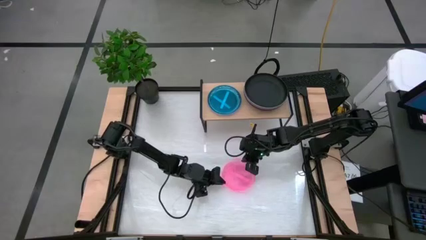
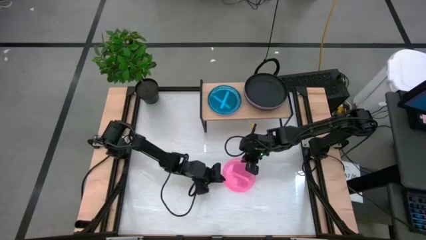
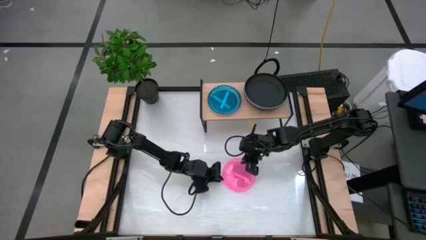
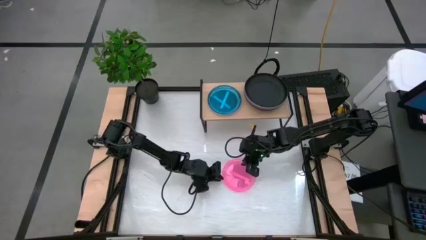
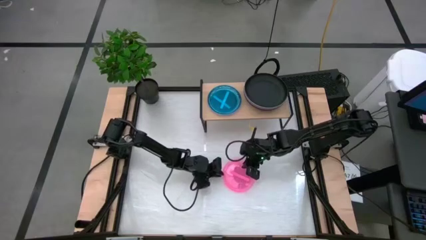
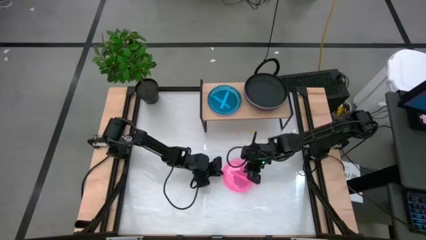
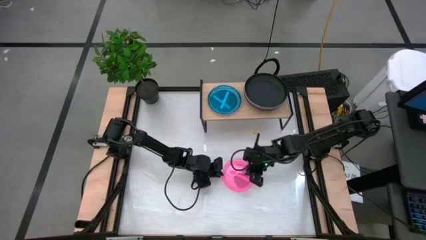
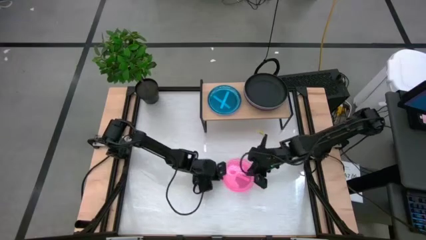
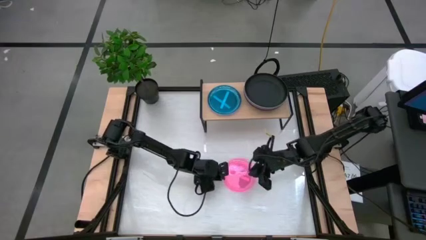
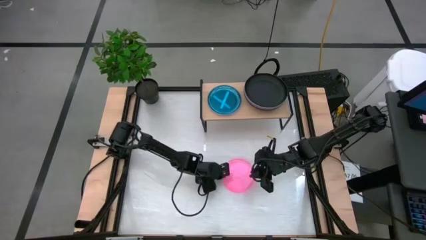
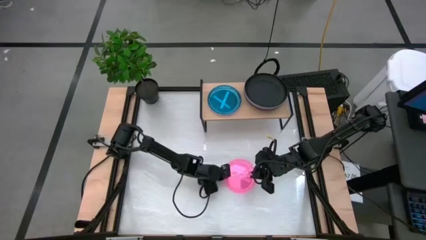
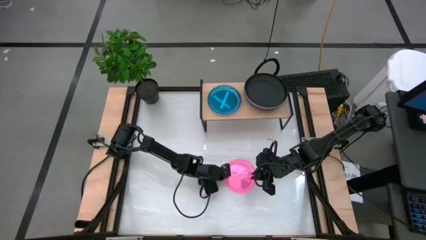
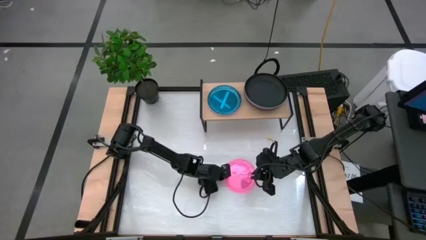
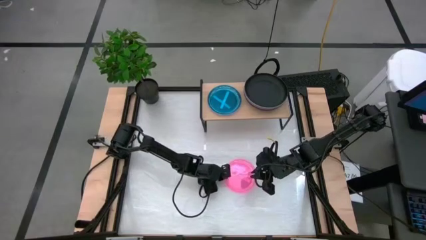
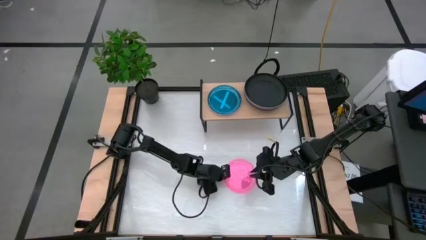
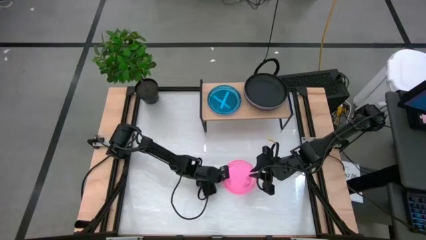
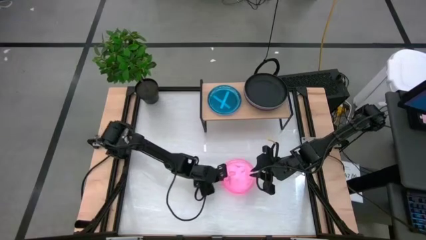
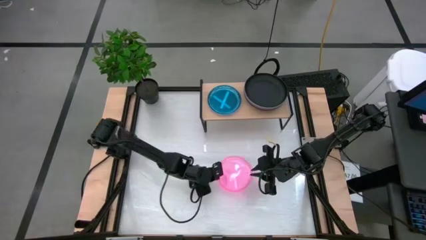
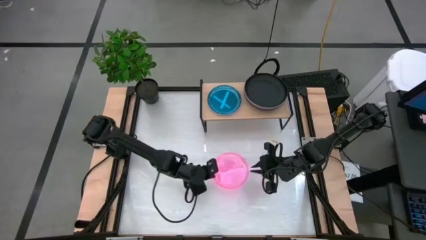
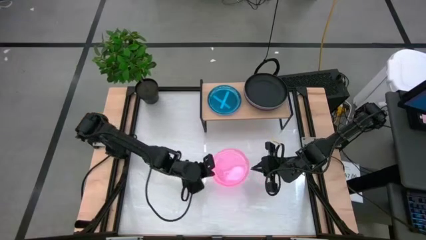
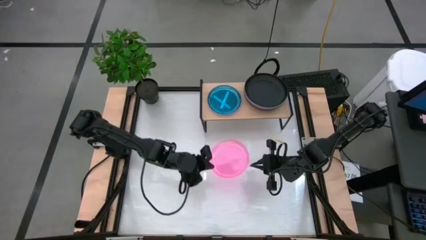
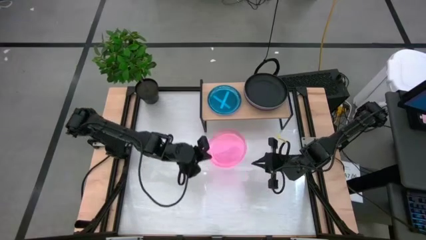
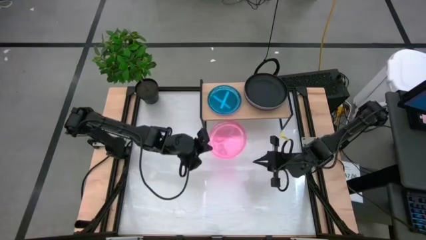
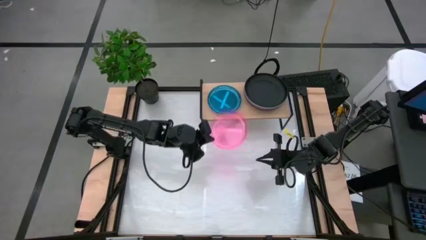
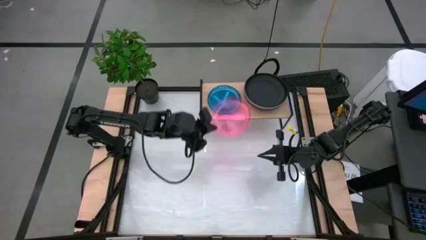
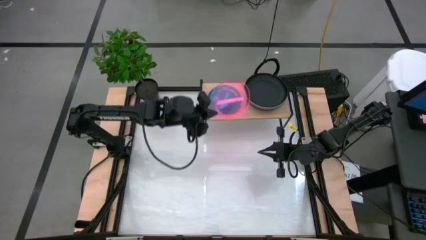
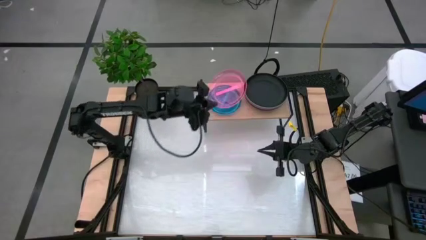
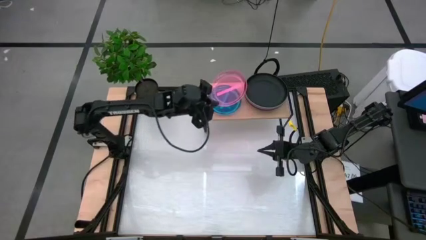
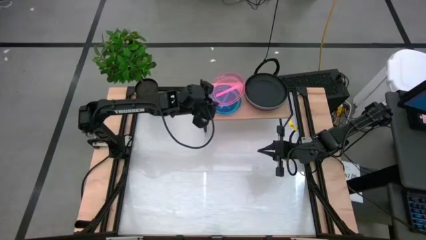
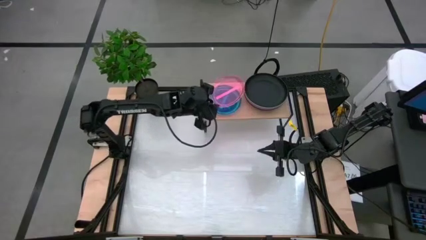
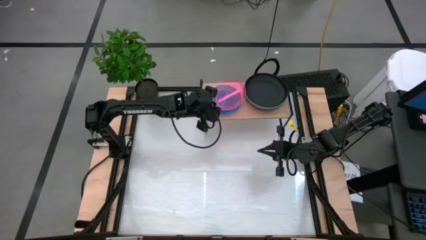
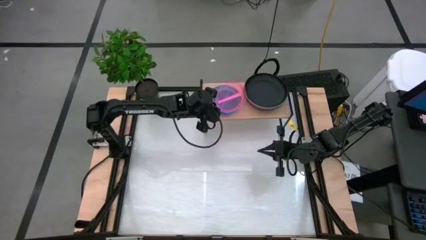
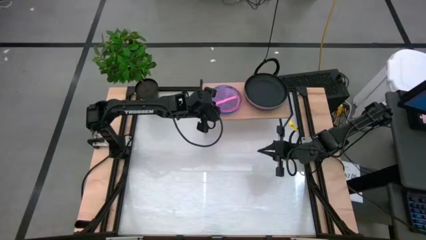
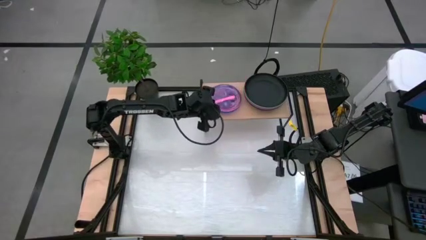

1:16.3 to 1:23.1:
Task: Place and stack plates onto a shelf
Stack the pink plate on the top of the blue plate on the shelf

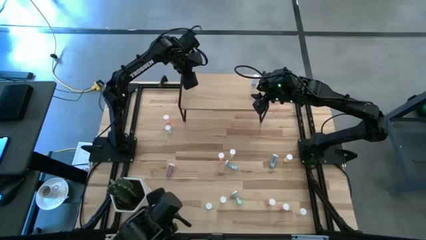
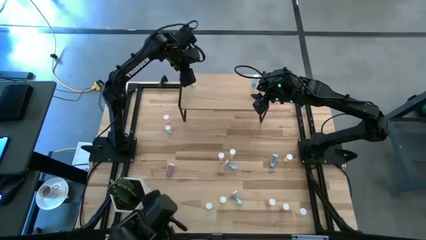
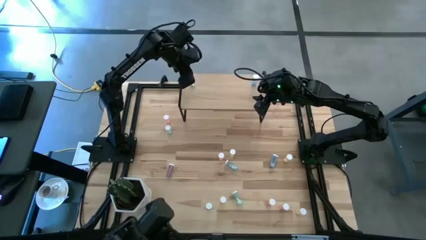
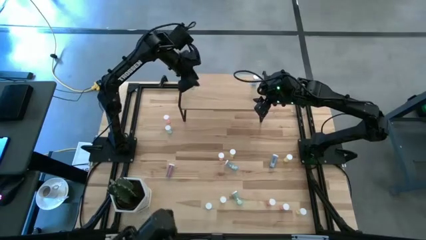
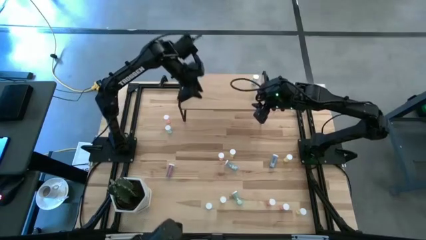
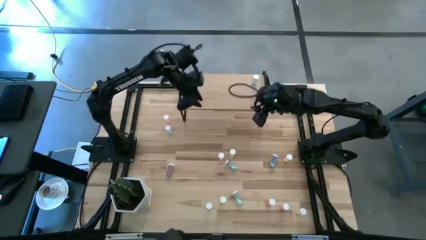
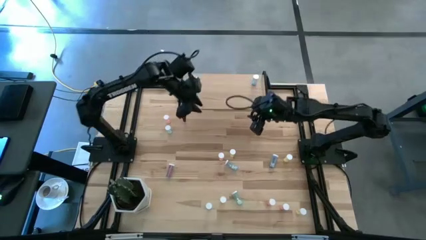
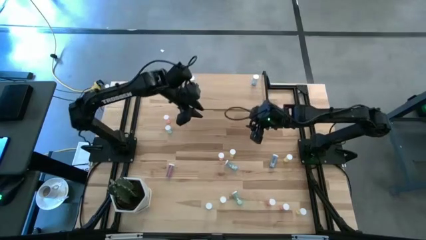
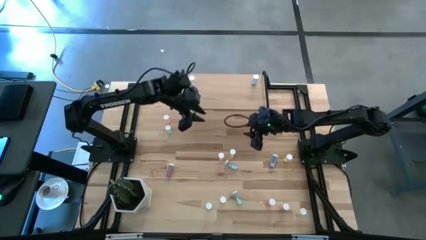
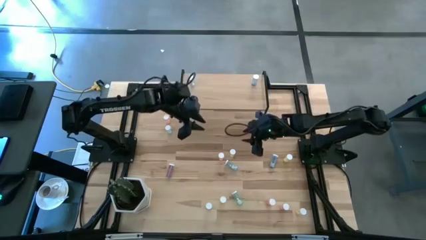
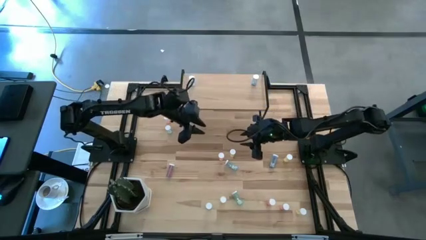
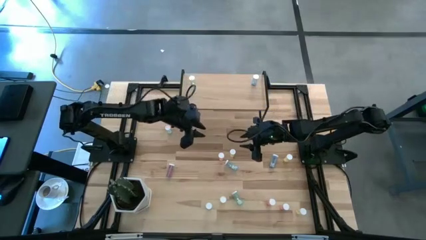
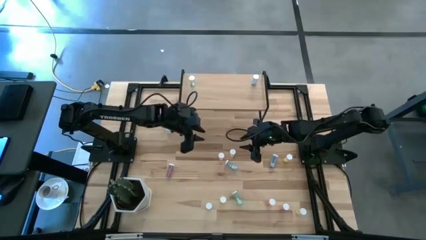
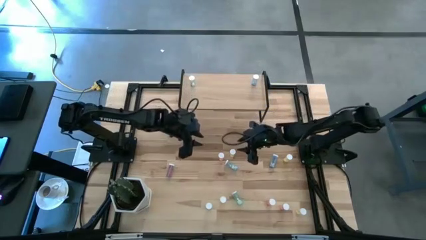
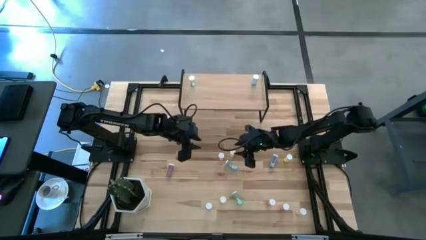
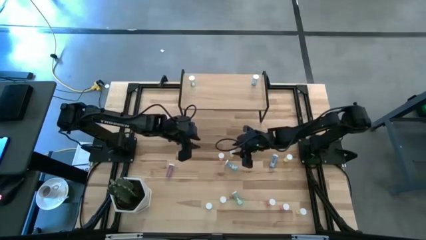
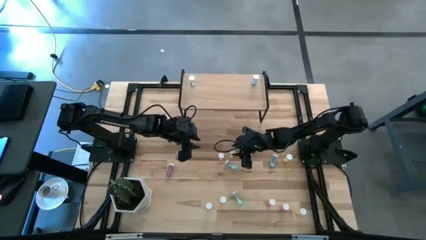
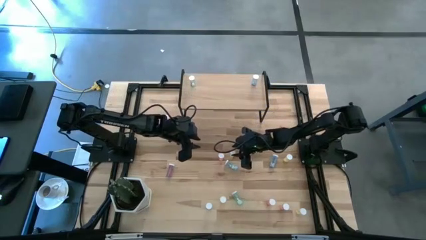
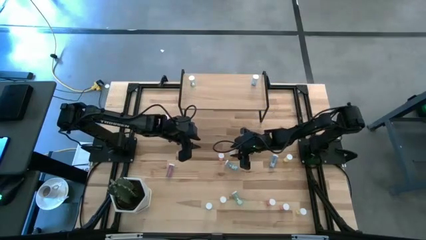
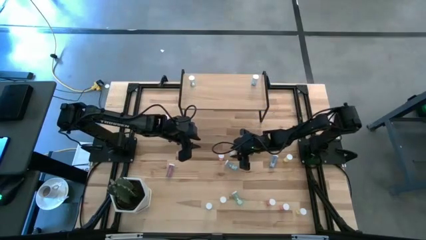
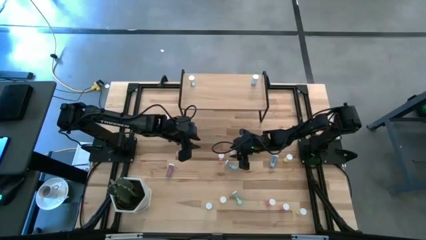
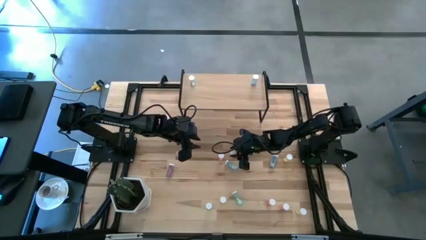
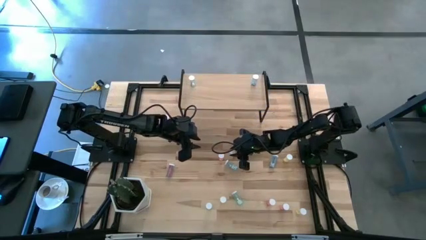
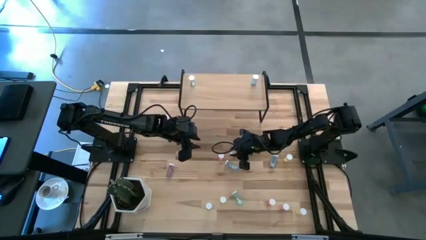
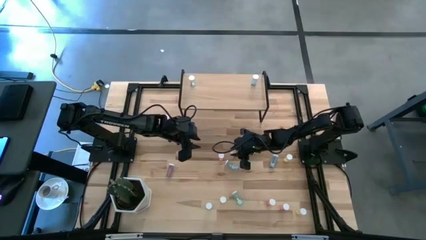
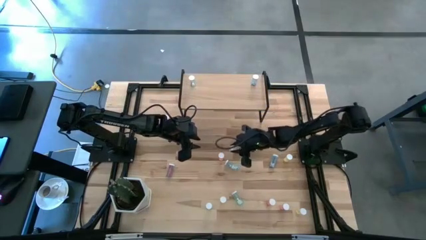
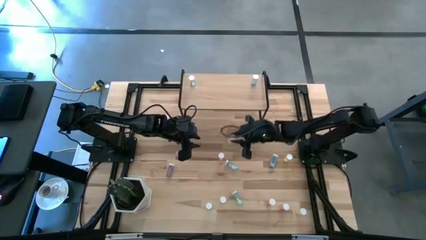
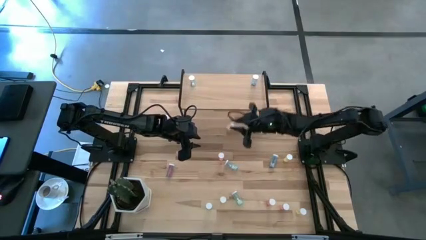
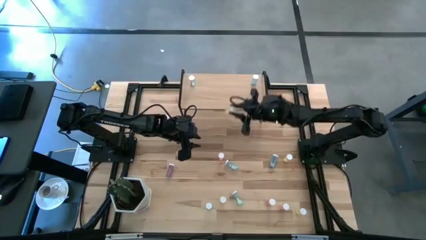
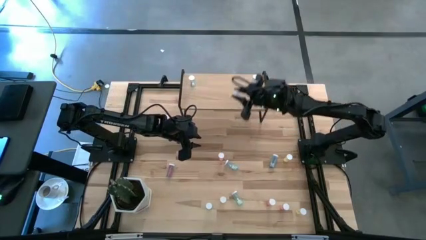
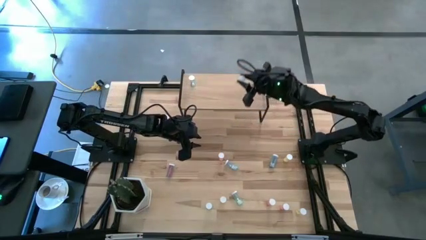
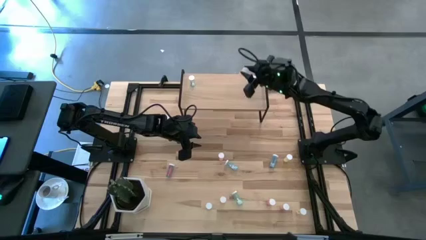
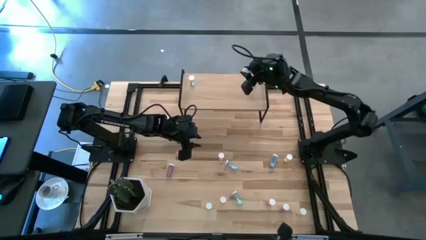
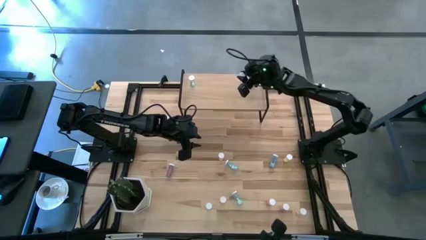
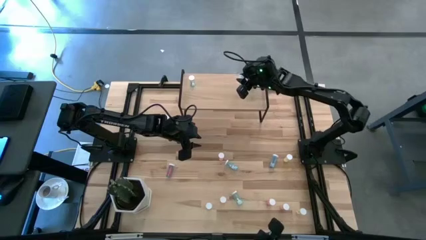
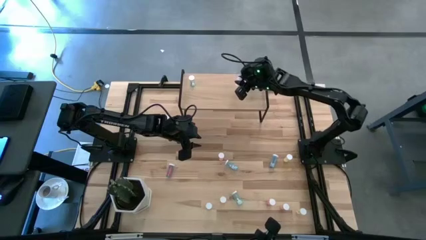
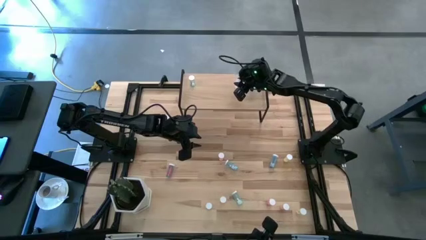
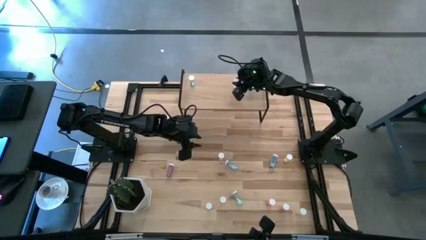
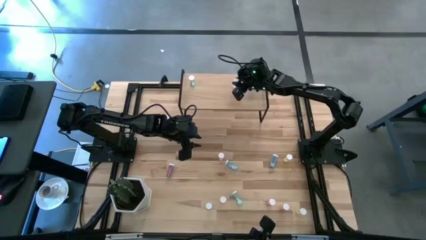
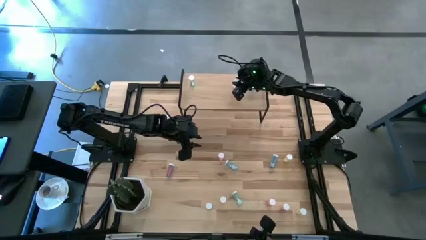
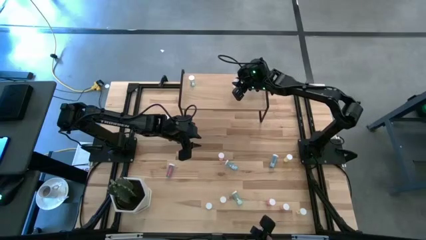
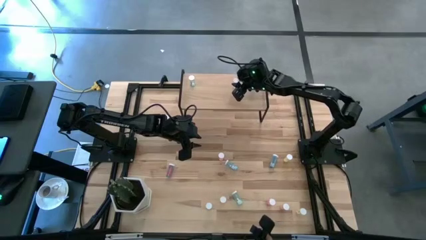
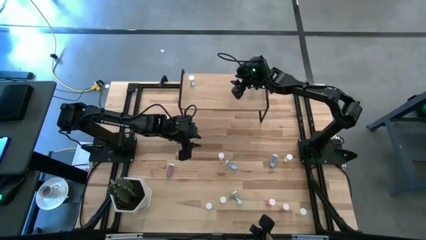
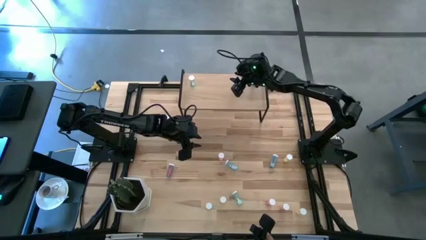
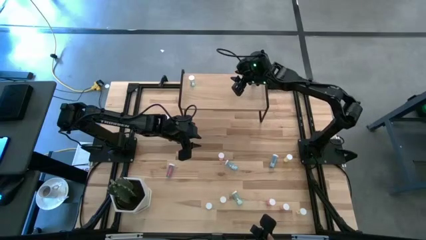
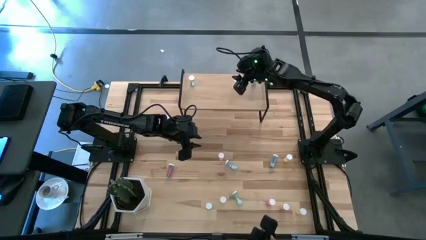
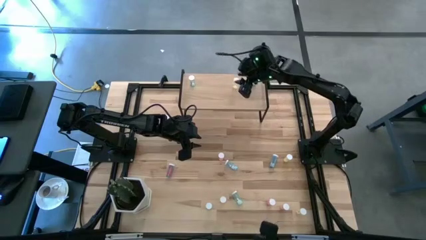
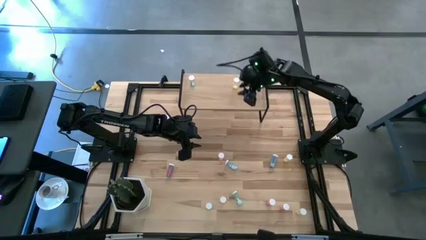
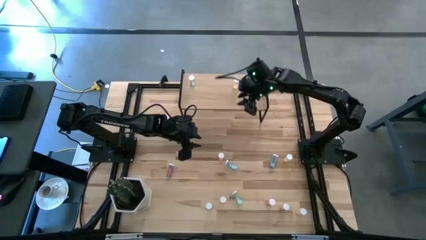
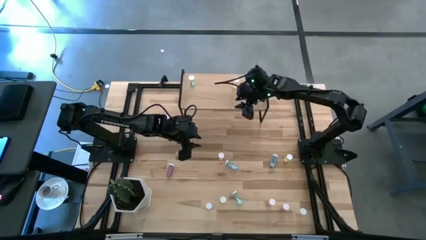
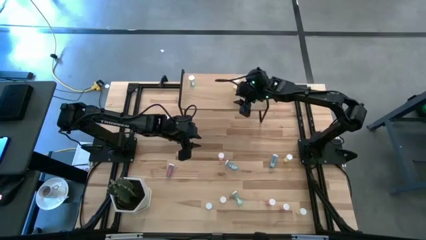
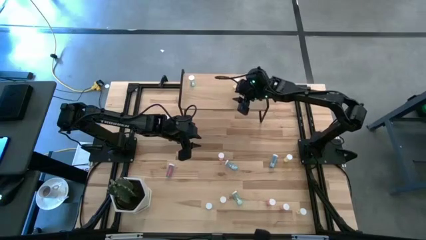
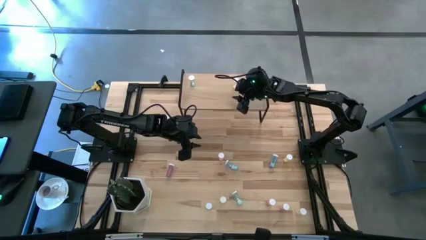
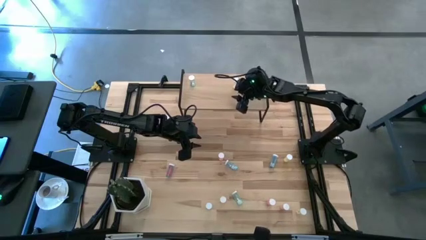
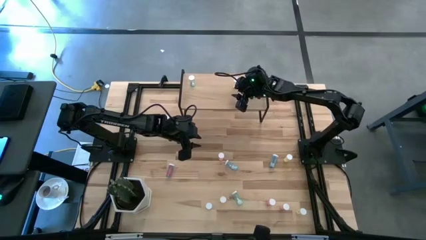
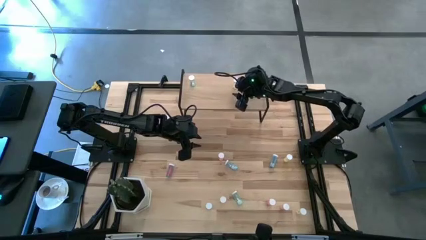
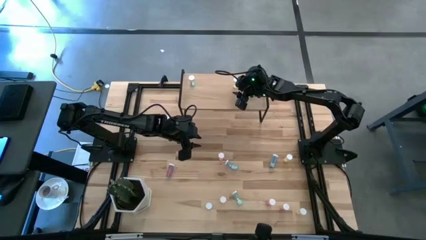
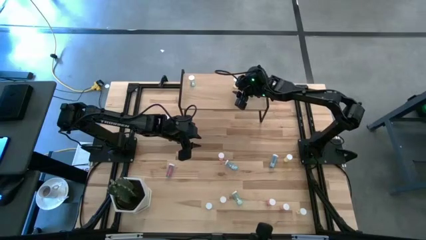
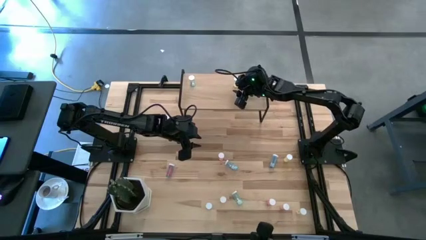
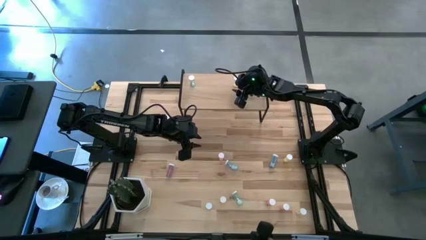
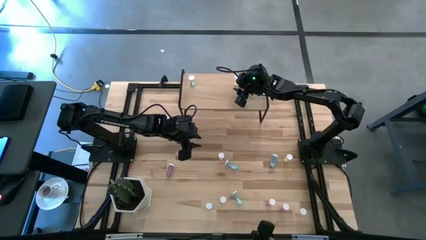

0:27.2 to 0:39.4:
Task: Pick and place medicine bottles onto shelf by color
Put the yellow pill bottle on the shelf
